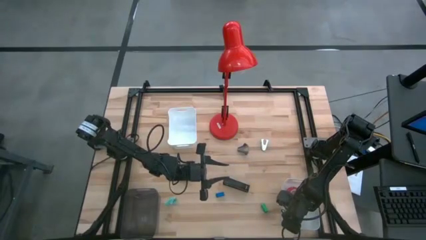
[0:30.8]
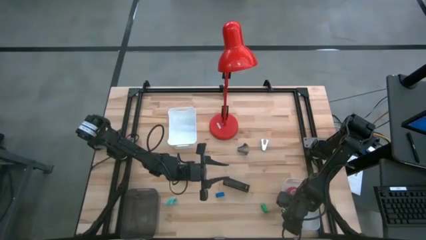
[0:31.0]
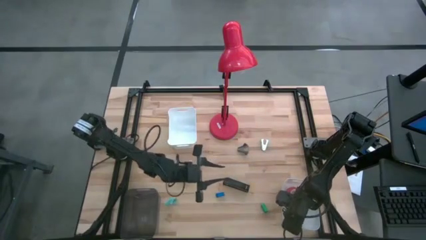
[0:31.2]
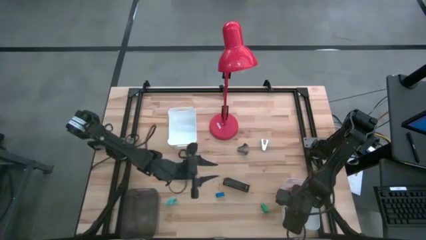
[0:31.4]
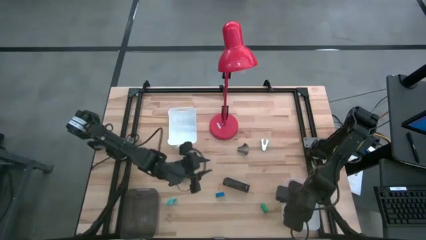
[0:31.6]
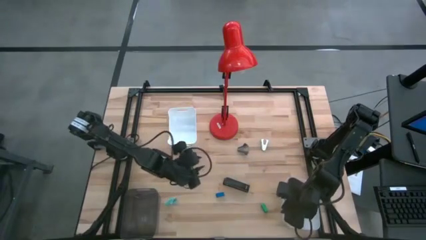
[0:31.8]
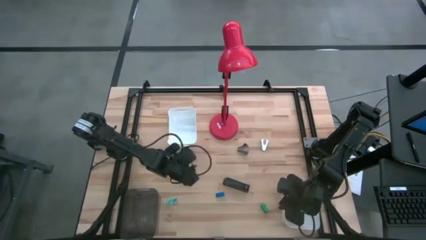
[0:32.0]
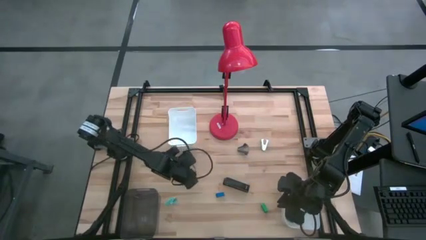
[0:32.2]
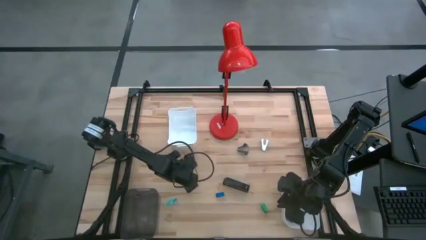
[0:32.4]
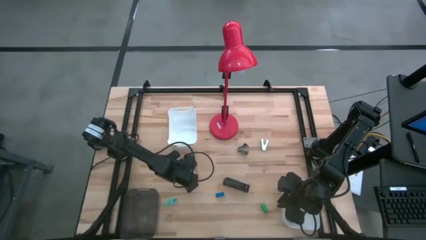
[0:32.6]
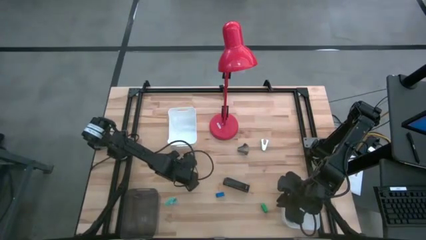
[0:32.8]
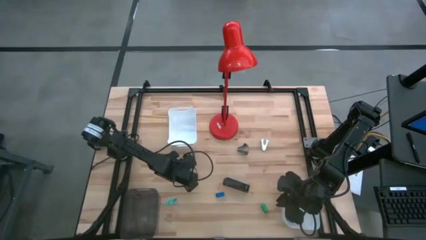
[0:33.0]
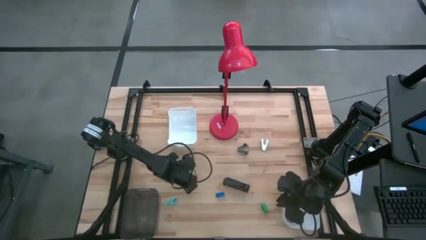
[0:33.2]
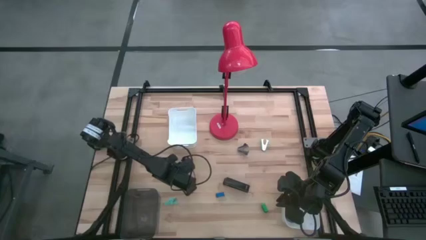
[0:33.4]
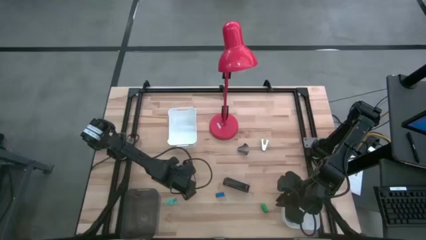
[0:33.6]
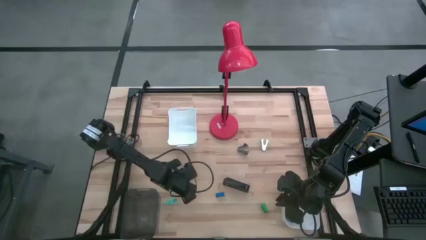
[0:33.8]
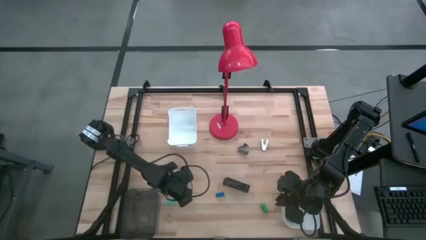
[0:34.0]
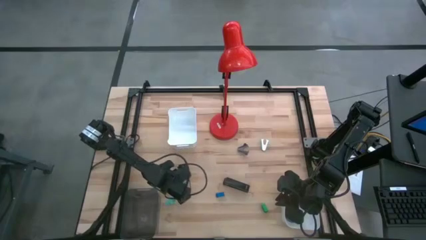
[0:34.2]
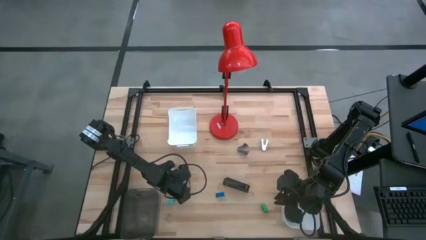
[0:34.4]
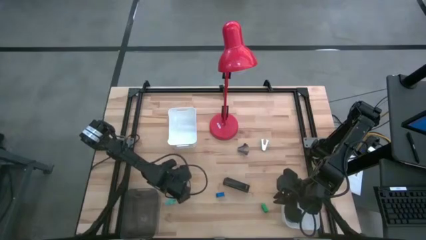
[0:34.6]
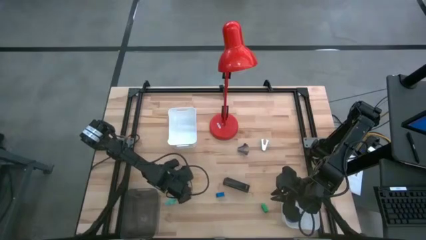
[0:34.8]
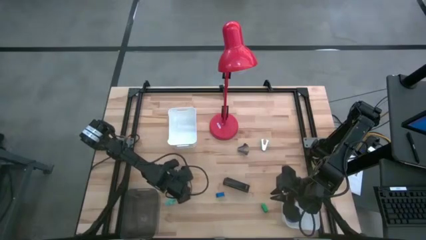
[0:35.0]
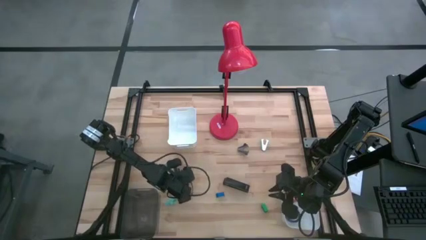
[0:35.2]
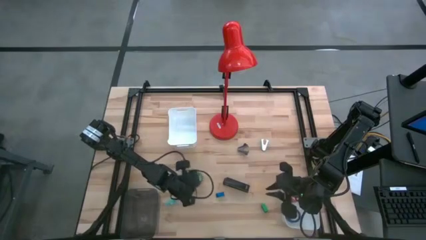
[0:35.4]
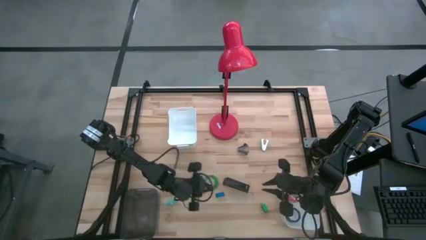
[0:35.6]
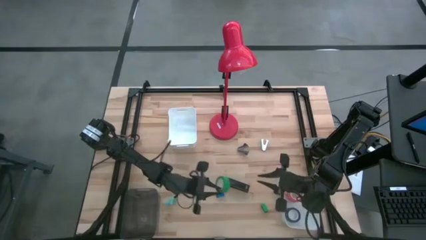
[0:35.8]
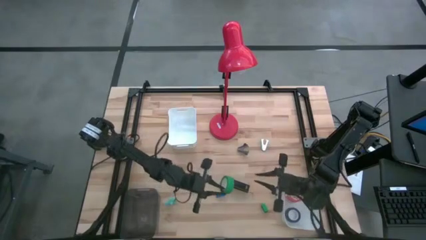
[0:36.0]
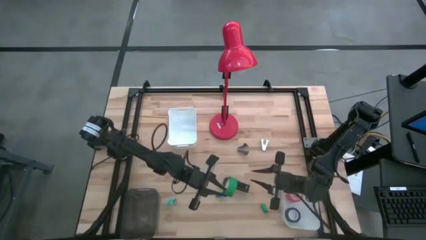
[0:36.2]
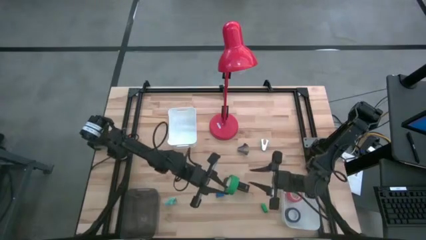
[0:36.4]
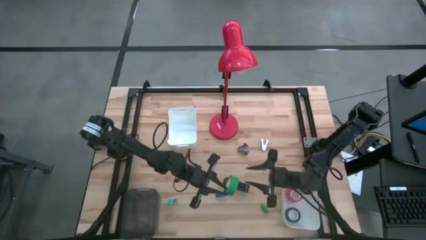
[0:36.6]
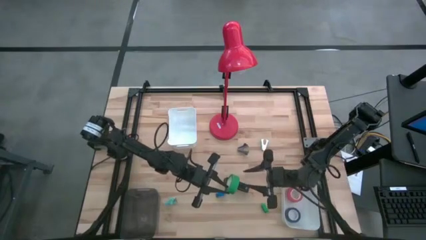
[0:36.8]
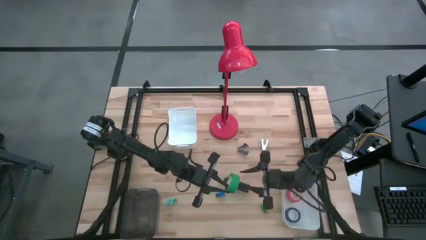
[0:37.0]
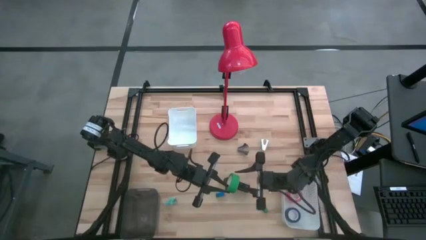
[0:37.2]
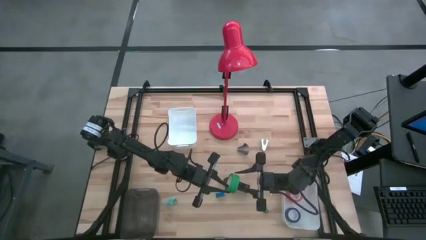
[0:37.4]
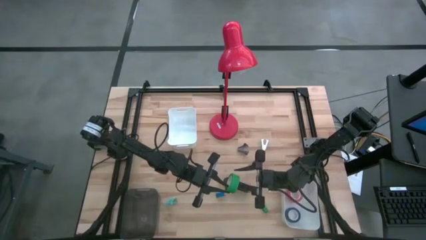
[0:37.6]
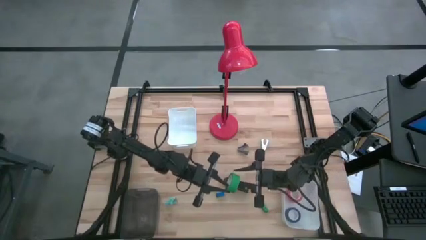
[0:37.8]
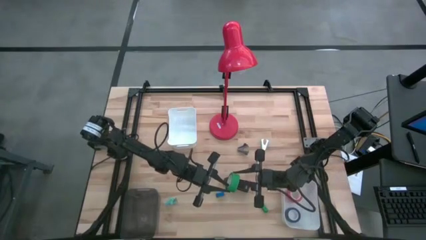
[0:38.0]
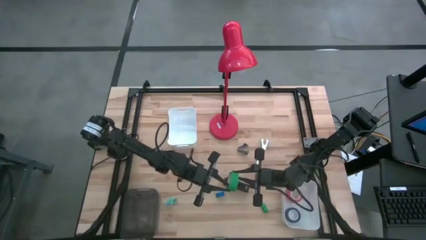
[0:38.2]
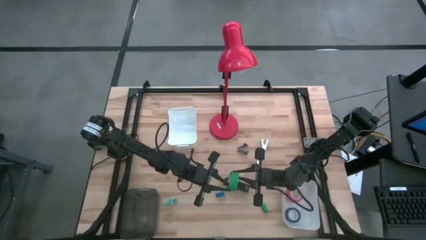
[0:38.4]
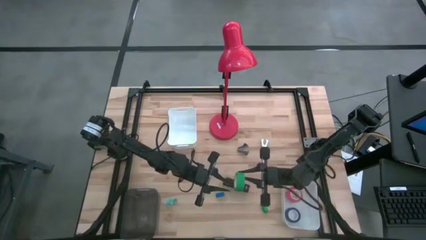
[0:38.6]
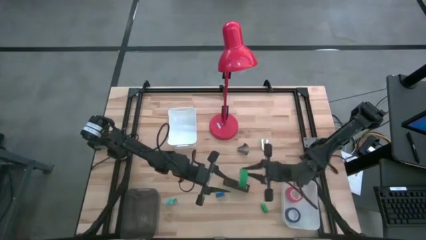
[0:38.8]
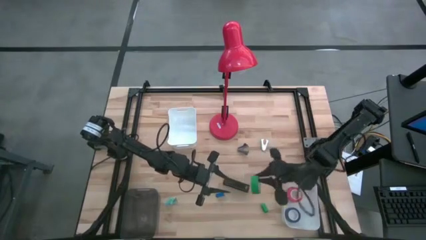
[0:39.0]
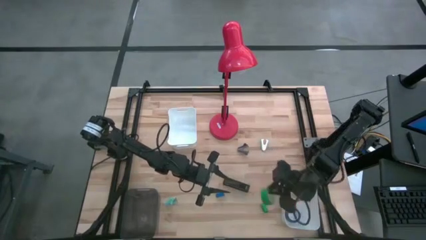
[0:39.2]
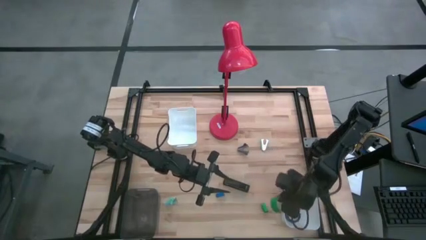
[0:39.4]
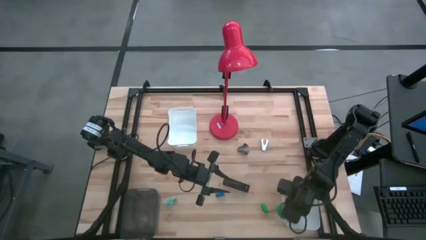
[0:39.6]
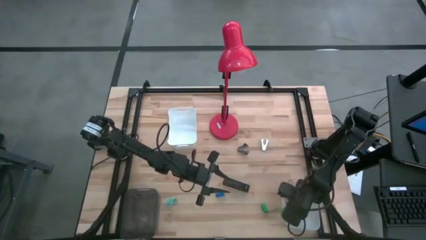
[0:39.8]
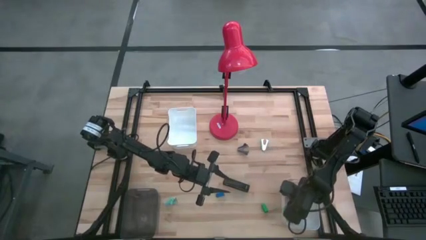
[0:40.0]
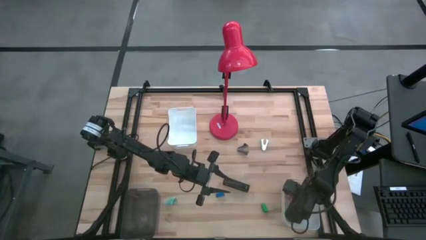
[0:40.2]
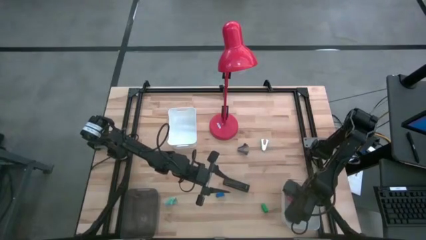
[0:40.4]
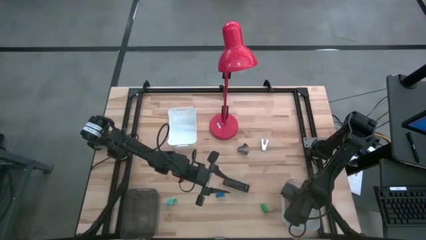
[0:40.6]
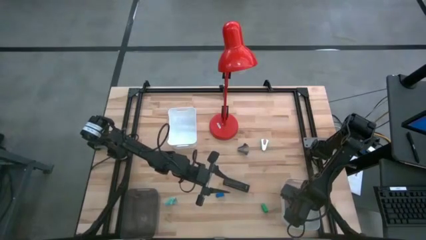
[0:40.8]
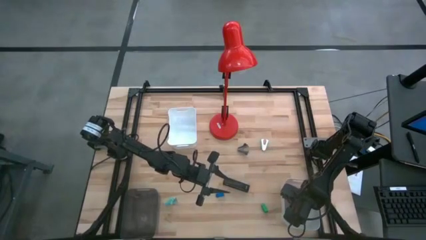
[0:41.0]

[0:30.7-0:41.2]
Task: Pick and place Stapler, Stapler remover, tape
Put the green tape into the bottom white bin
